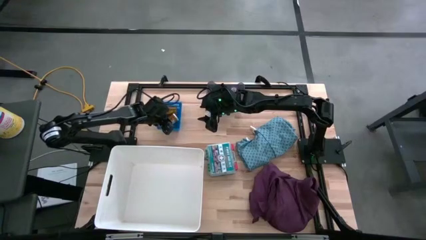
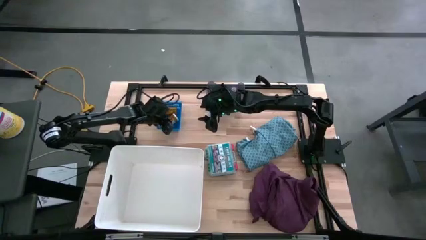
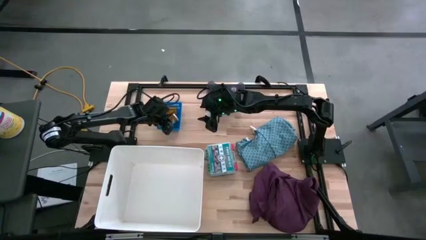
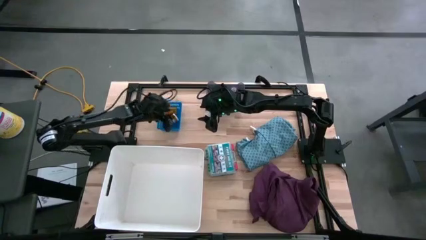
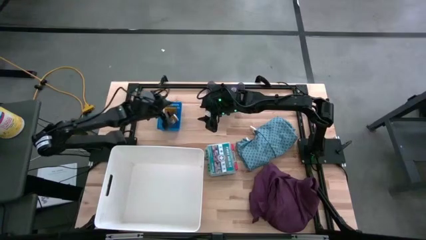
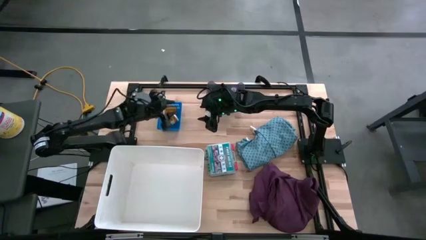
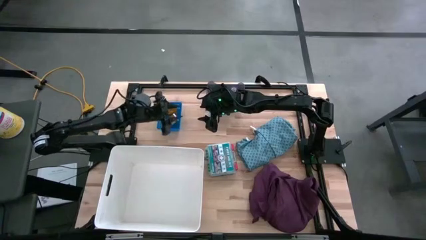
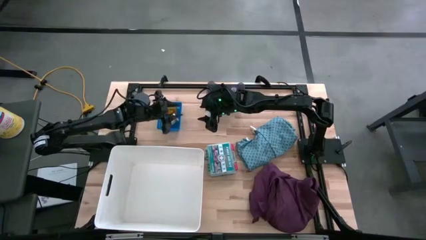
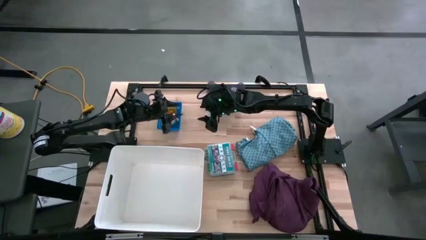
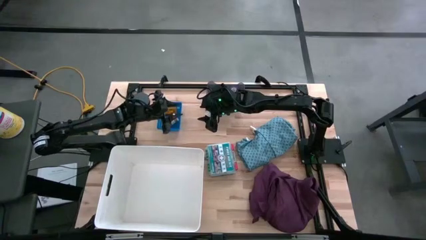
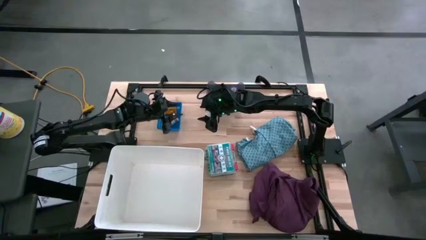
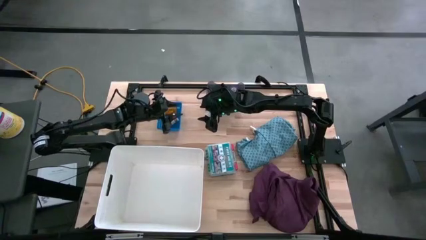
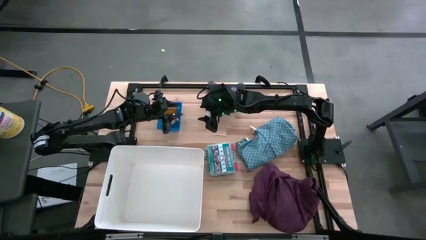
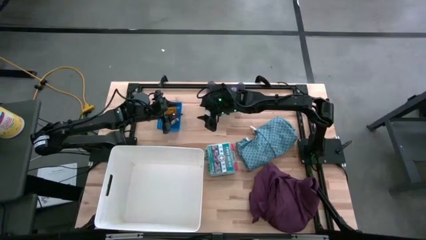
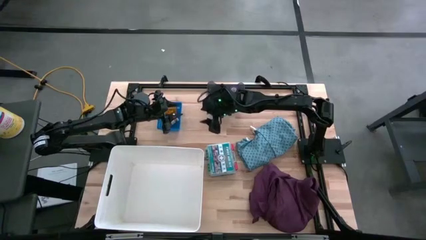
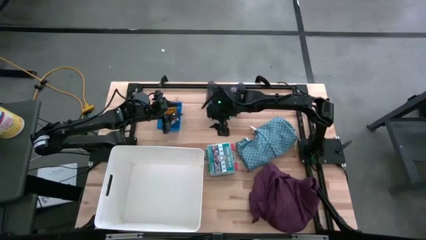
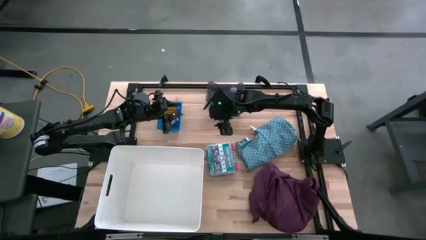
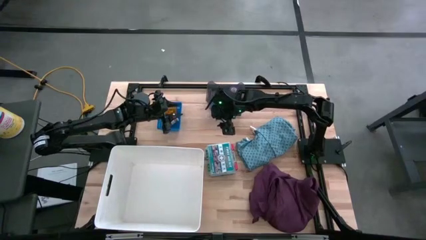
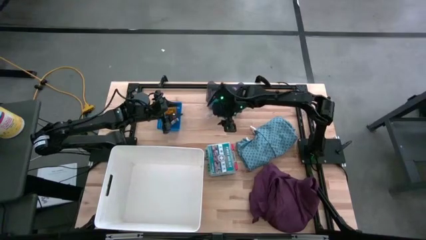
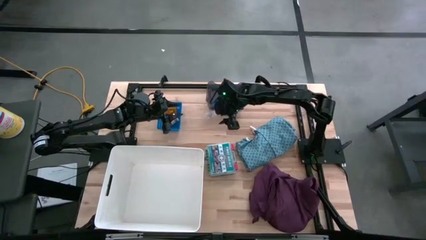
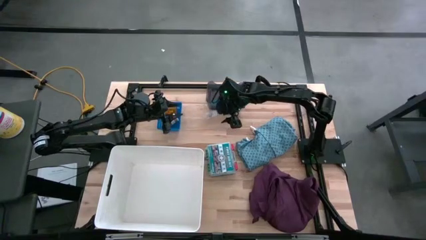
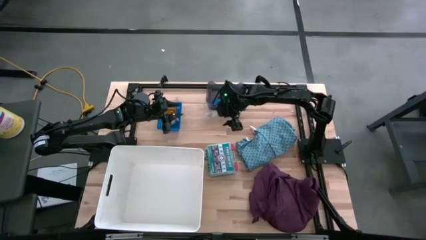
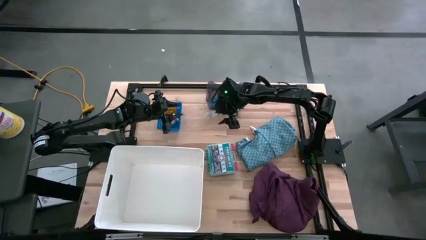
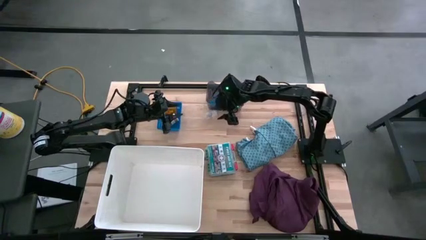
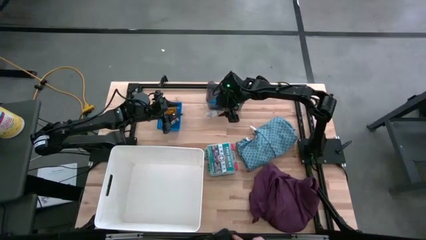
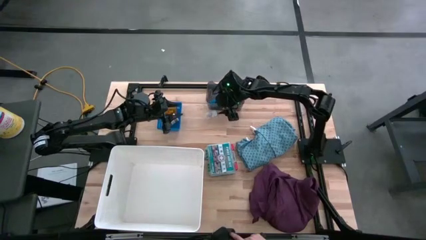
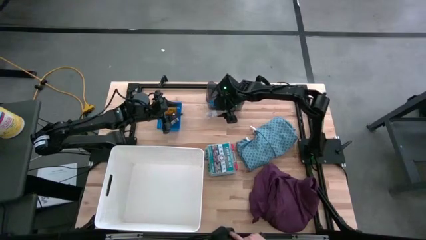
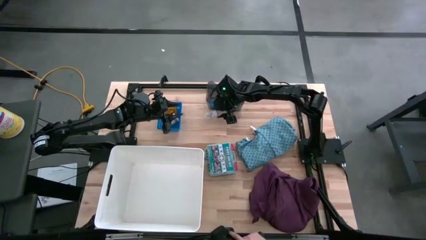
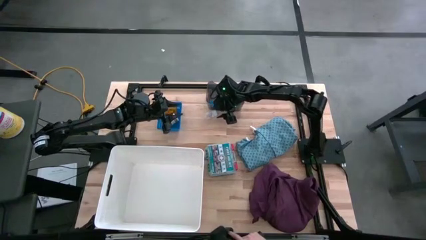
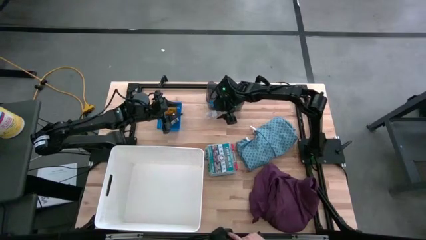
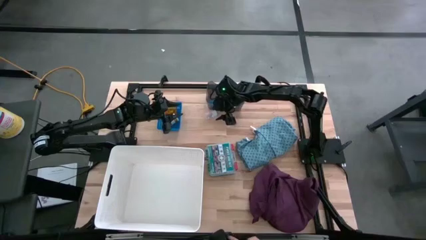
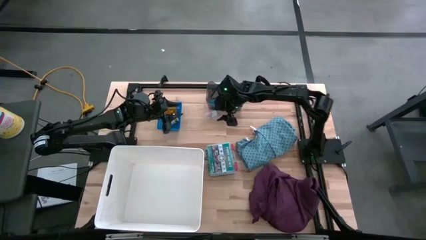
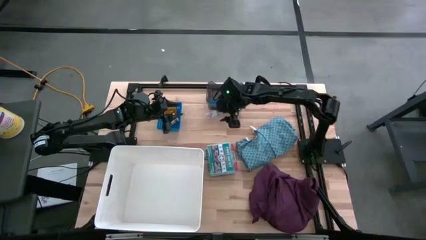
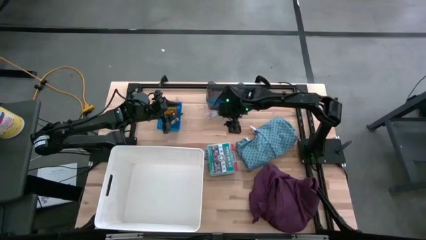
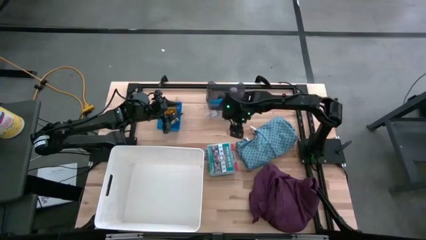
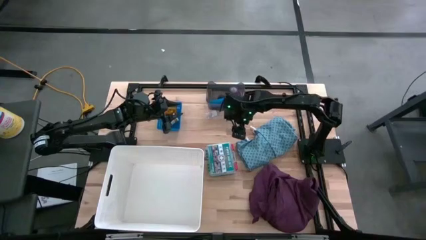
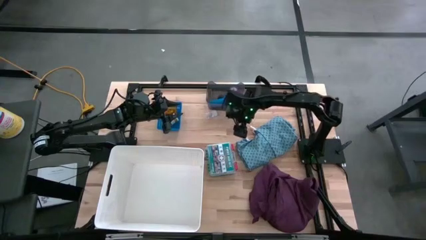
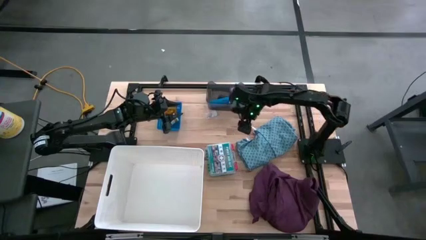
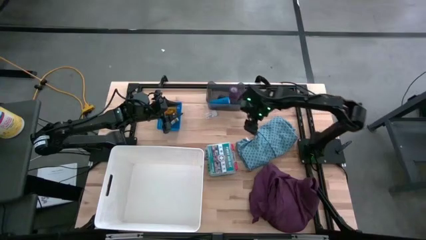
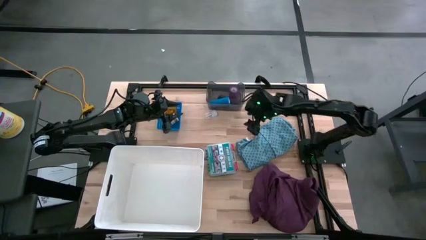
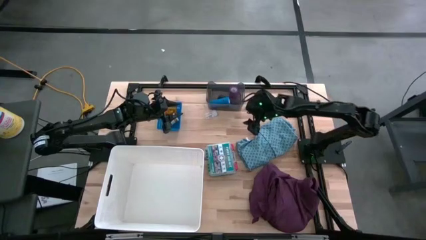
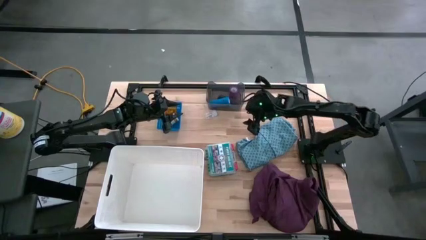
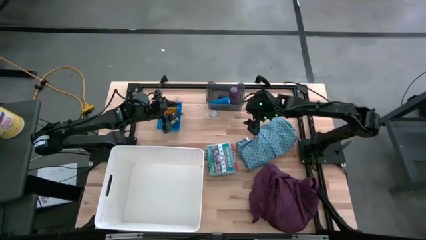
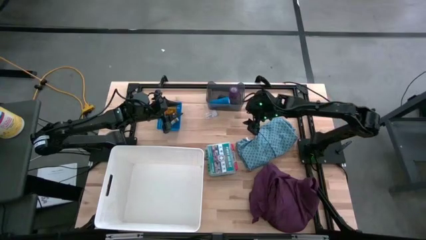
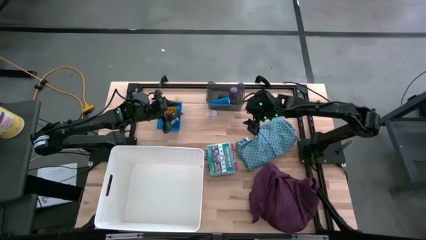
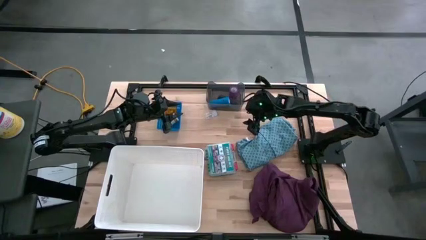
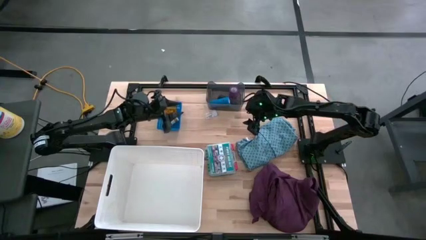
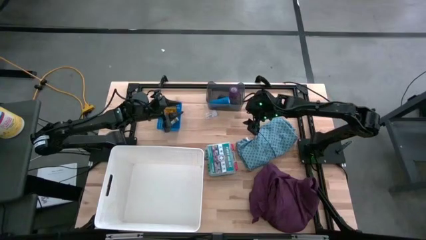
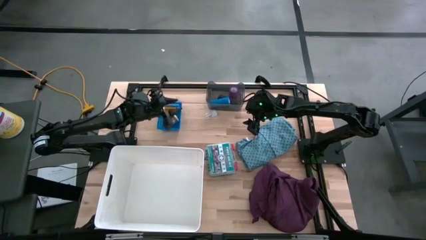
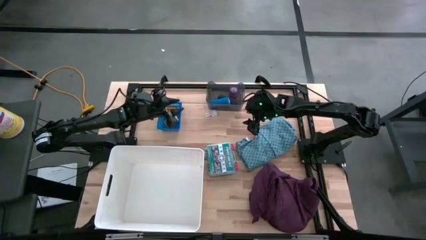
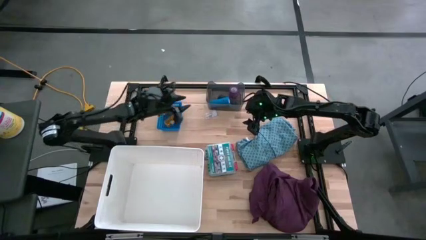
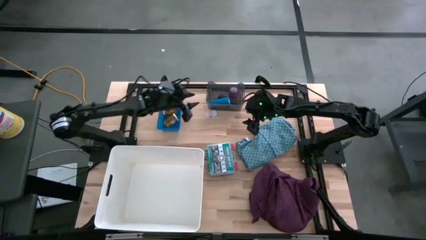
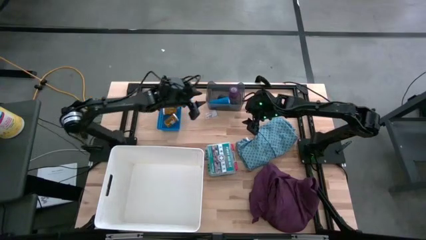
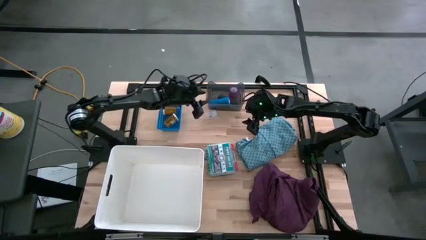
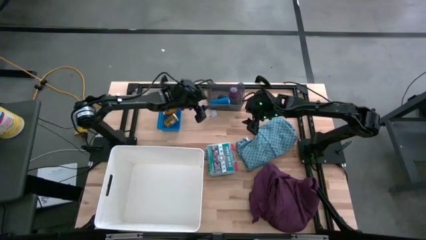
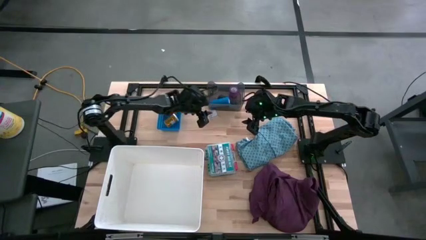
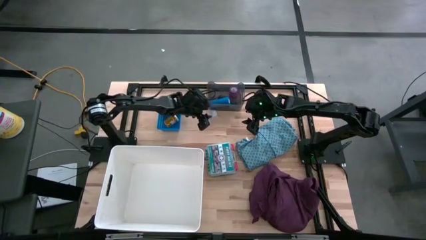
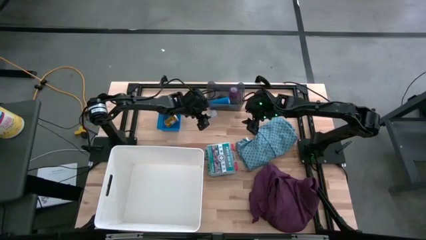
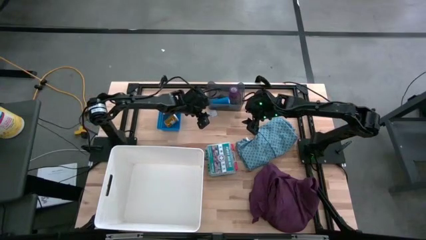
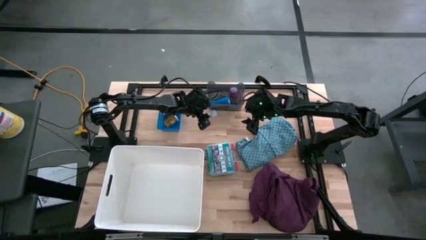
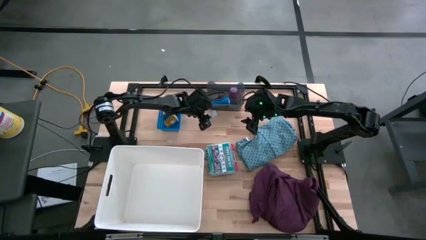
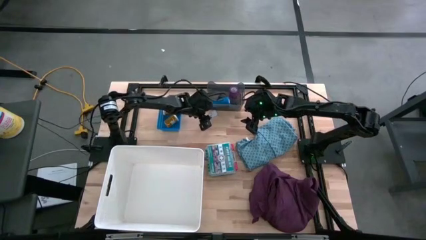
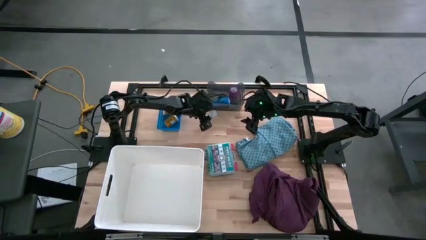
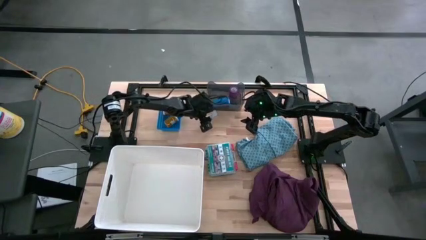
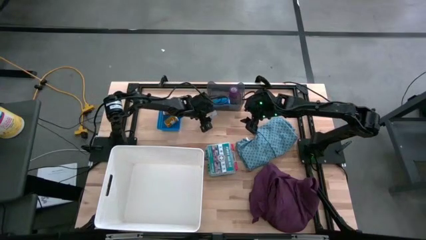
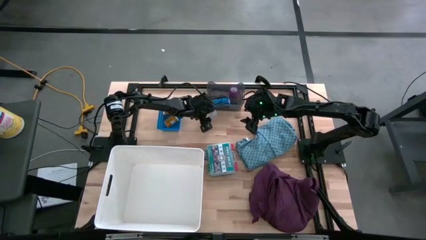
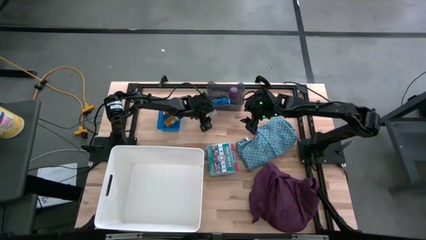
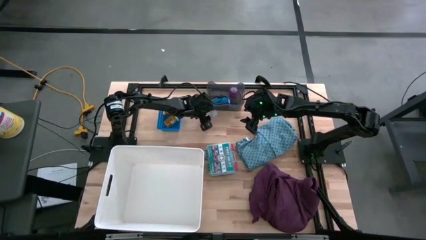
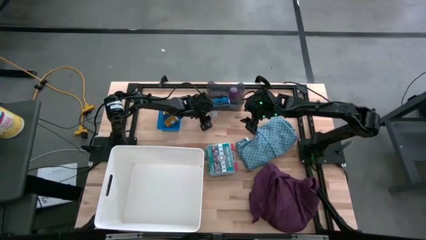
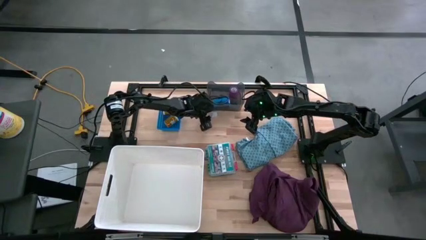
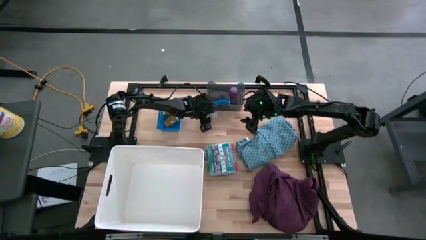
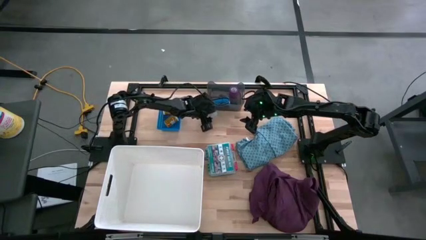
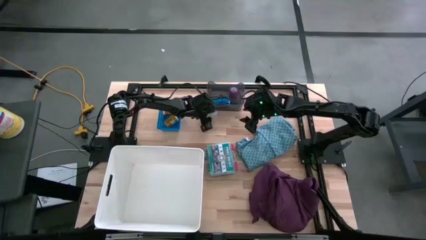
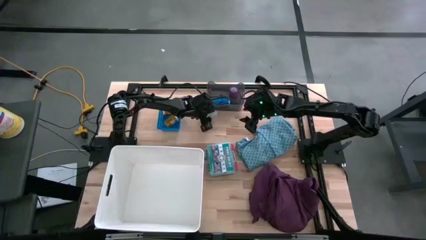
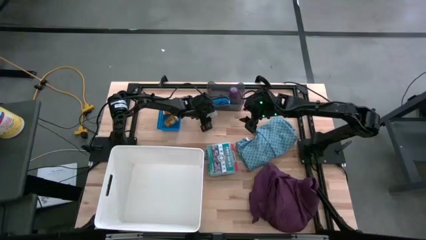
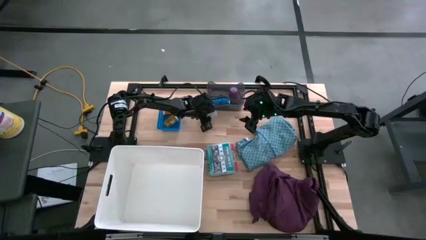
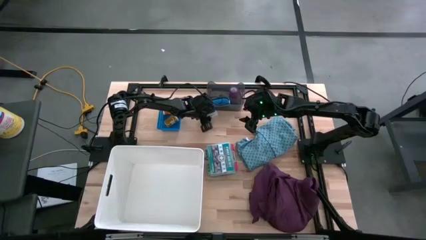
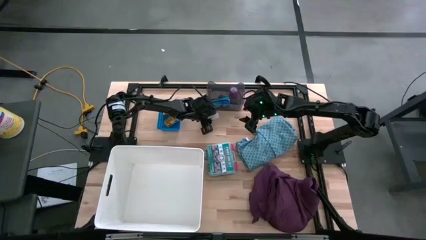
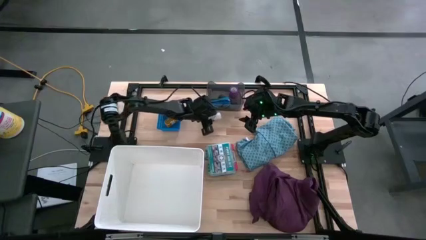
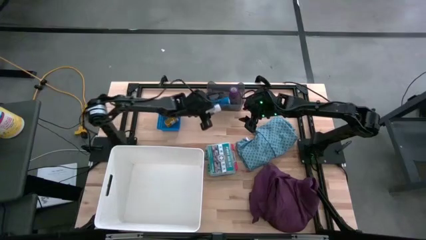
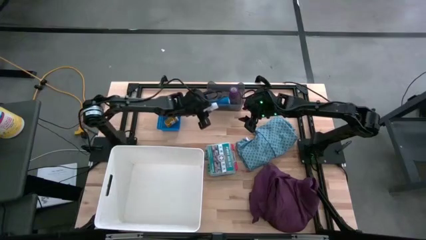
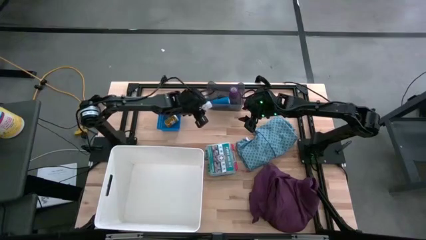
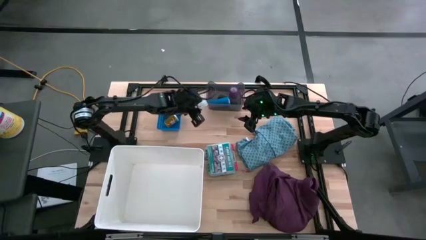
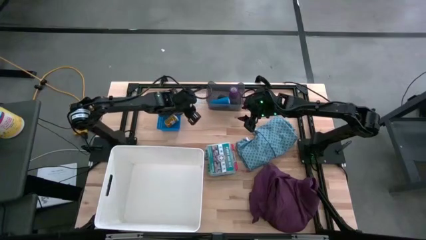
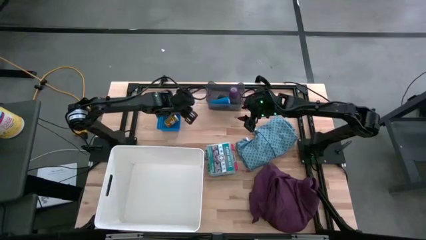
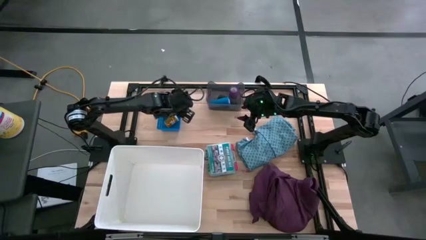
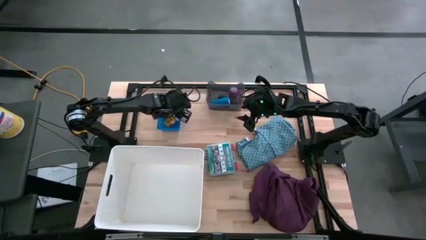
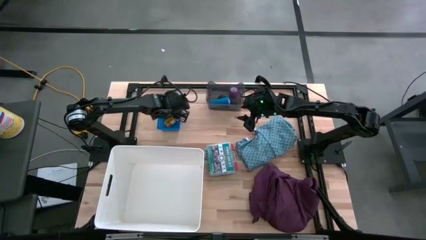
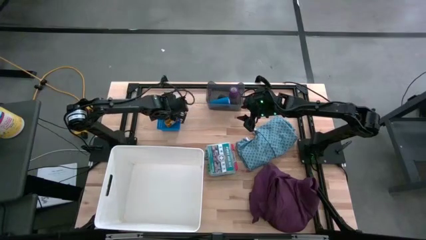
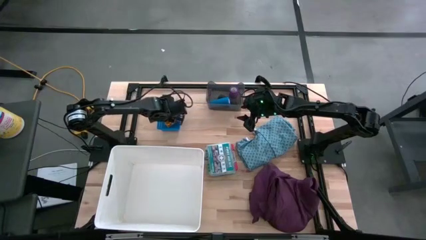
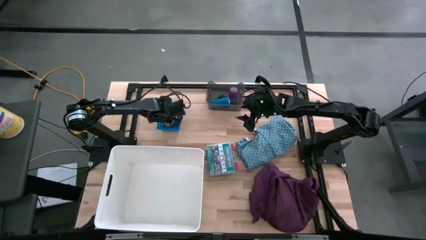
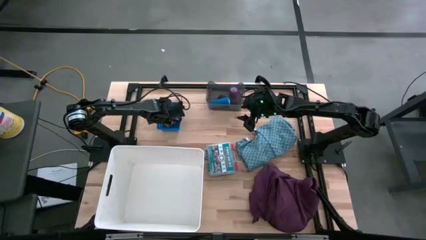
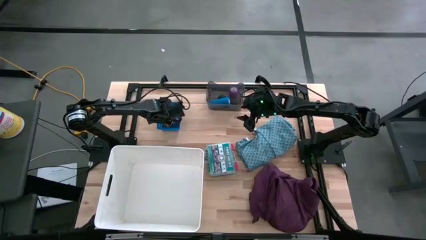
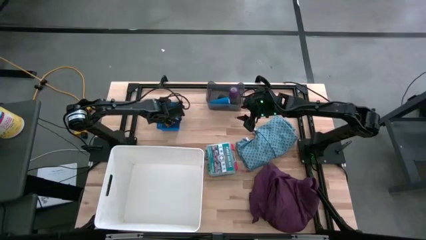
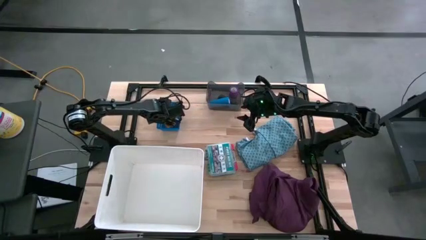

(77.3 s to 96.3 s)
Task: Pick & place medical supplies in basket/bin
Put the transparent pill bottle into the blue bin
